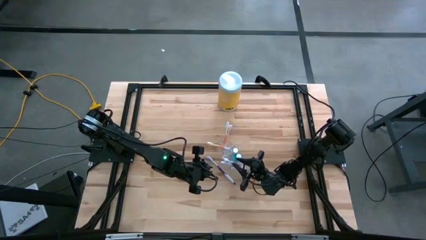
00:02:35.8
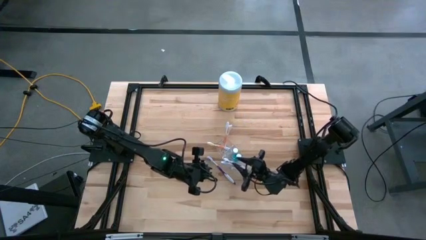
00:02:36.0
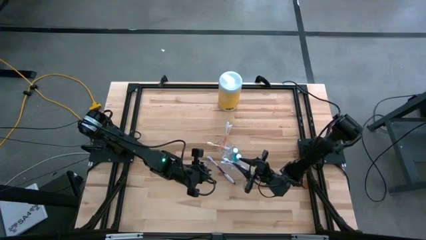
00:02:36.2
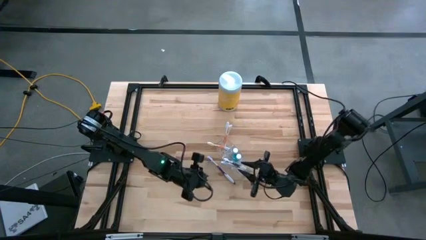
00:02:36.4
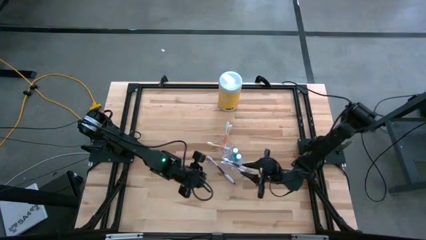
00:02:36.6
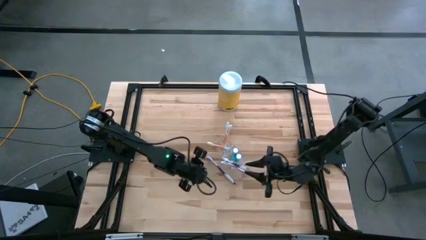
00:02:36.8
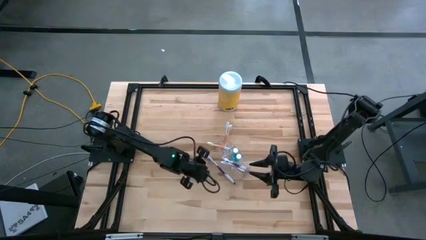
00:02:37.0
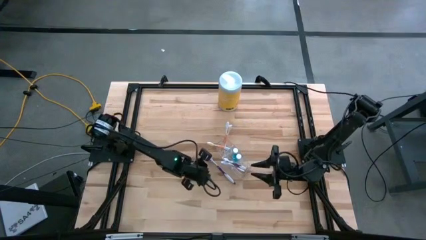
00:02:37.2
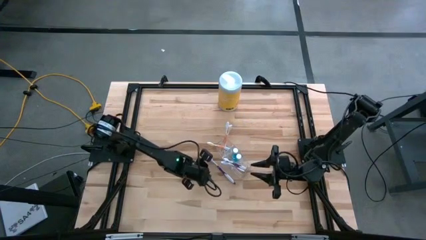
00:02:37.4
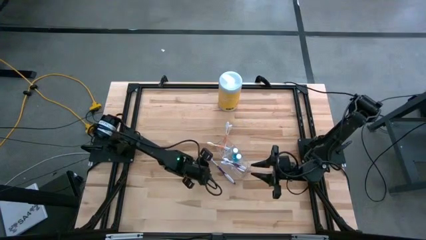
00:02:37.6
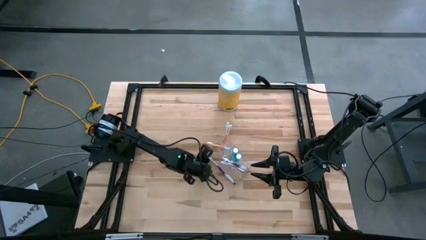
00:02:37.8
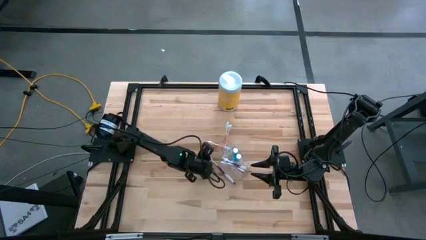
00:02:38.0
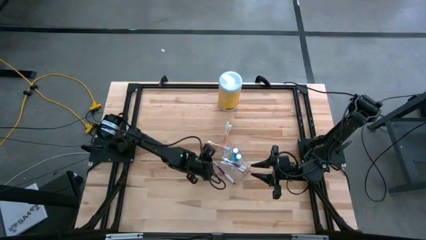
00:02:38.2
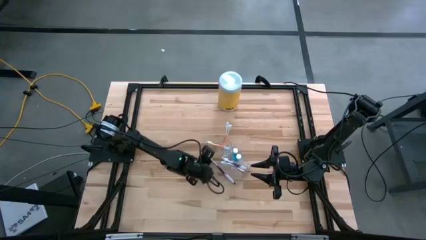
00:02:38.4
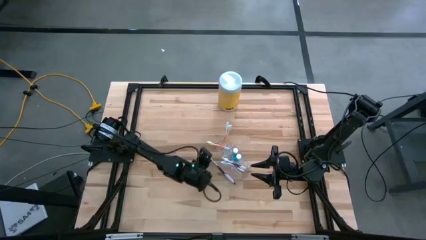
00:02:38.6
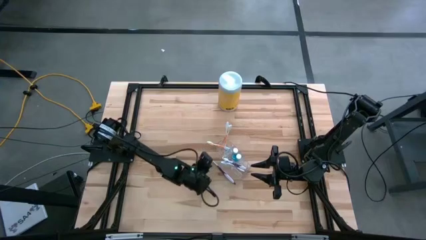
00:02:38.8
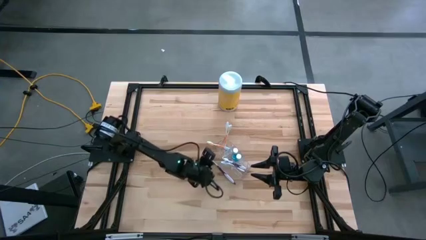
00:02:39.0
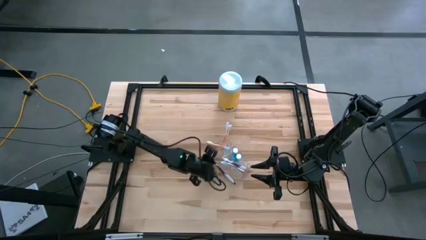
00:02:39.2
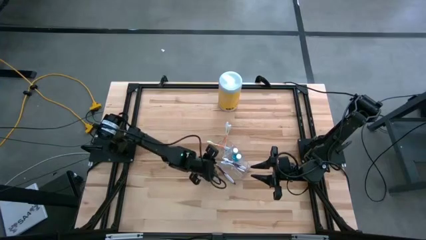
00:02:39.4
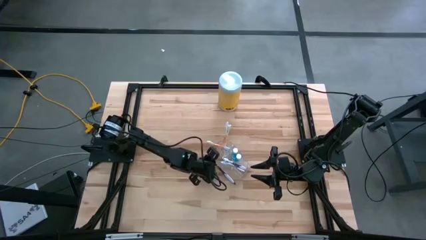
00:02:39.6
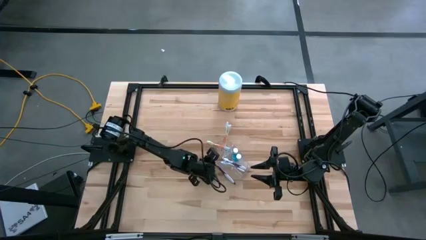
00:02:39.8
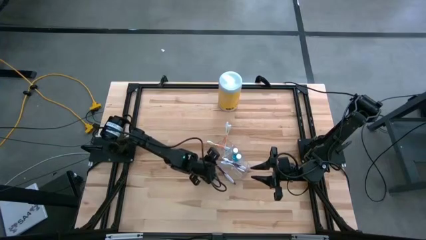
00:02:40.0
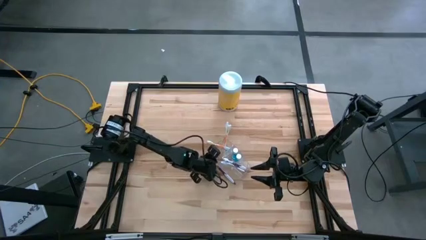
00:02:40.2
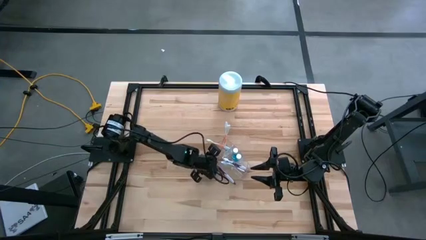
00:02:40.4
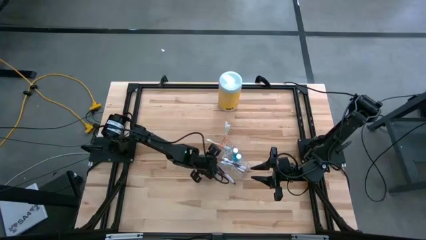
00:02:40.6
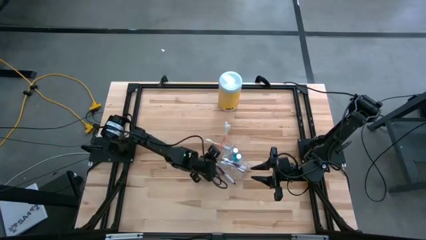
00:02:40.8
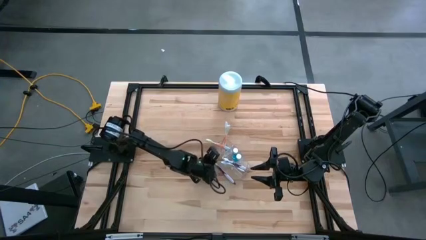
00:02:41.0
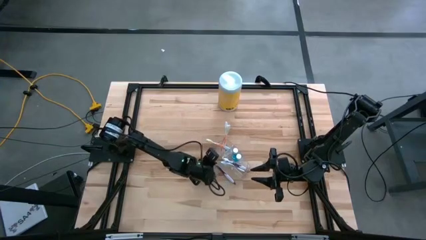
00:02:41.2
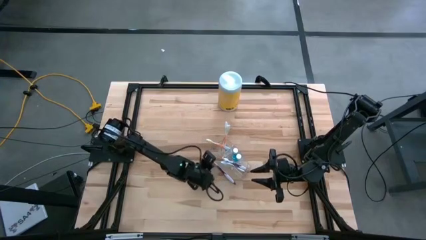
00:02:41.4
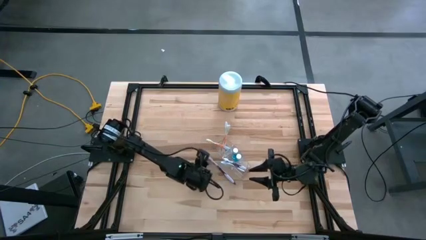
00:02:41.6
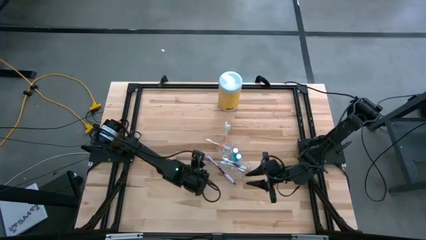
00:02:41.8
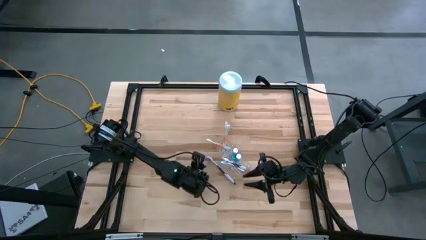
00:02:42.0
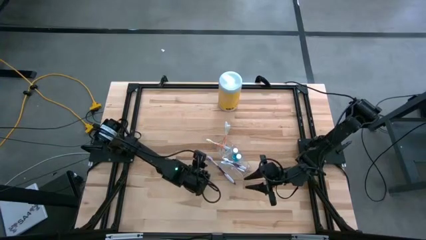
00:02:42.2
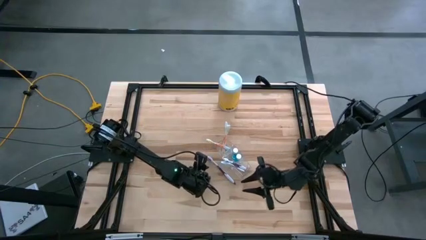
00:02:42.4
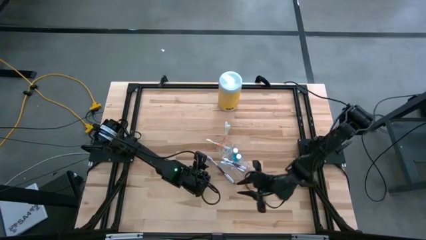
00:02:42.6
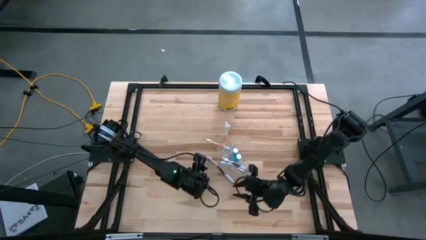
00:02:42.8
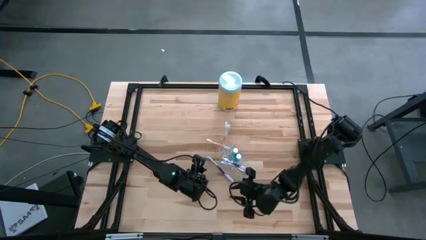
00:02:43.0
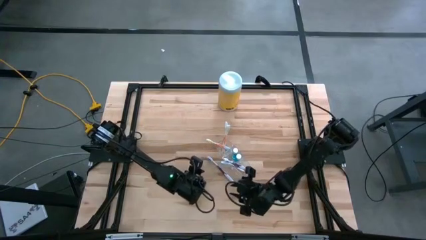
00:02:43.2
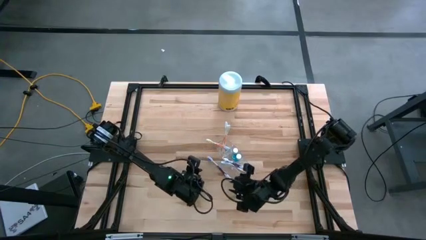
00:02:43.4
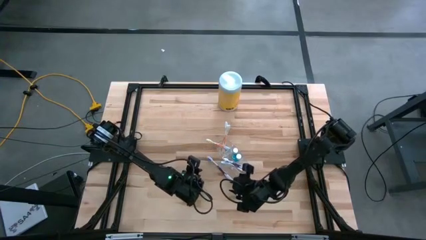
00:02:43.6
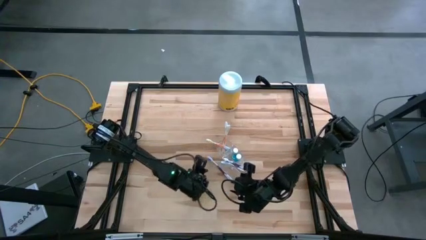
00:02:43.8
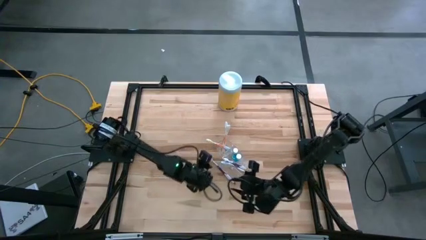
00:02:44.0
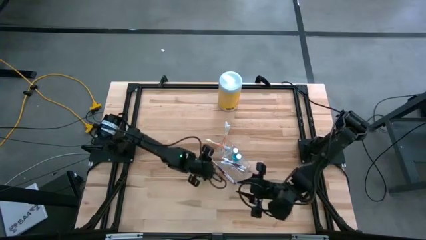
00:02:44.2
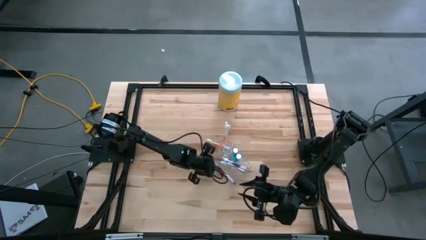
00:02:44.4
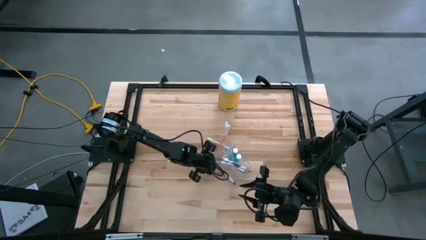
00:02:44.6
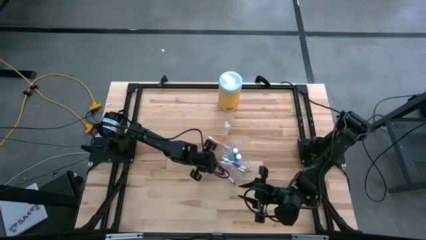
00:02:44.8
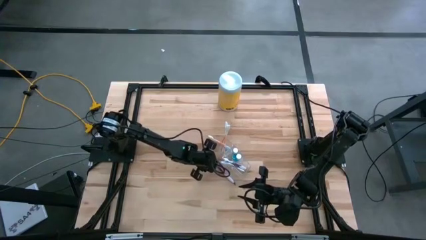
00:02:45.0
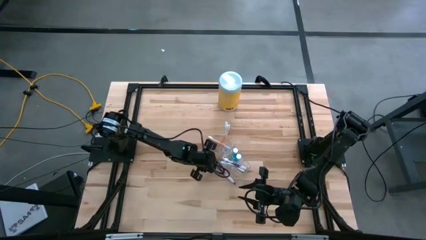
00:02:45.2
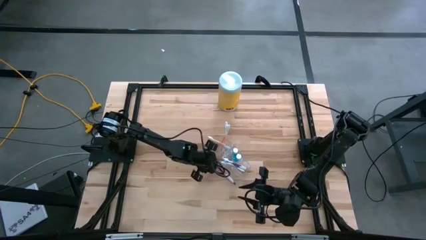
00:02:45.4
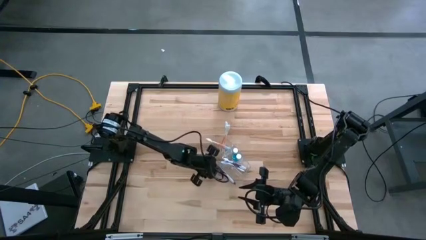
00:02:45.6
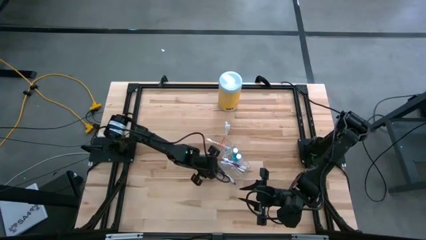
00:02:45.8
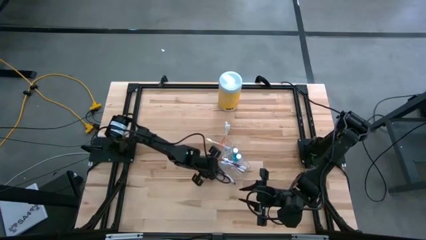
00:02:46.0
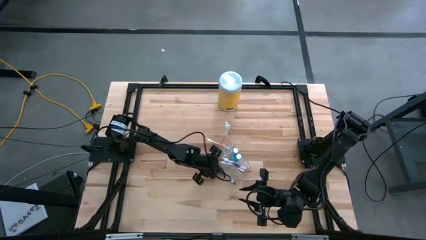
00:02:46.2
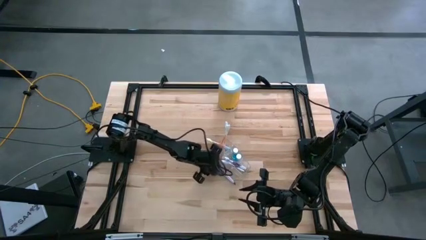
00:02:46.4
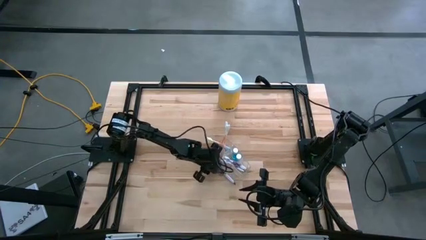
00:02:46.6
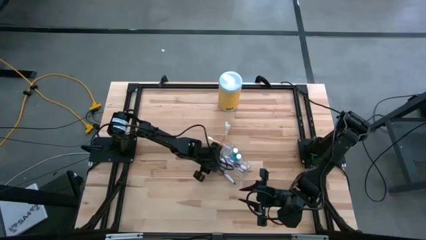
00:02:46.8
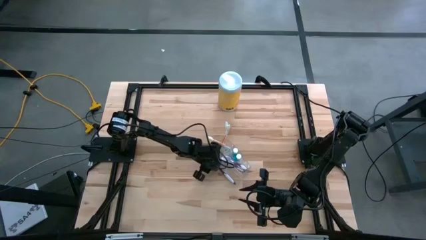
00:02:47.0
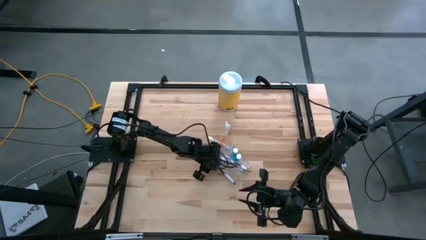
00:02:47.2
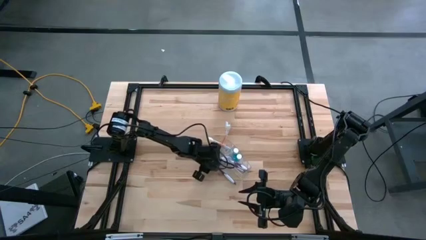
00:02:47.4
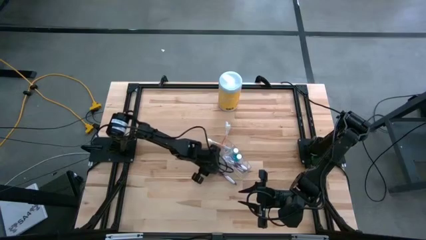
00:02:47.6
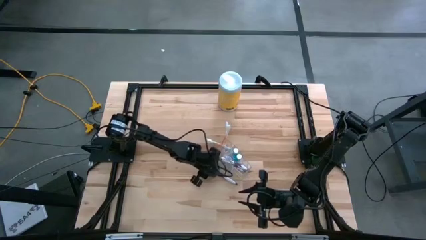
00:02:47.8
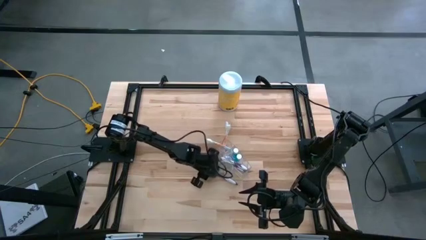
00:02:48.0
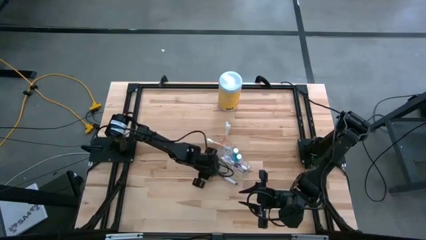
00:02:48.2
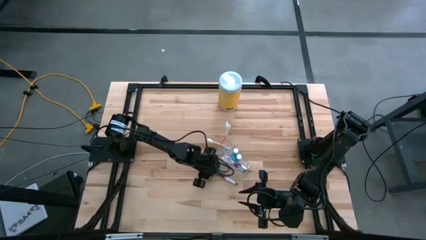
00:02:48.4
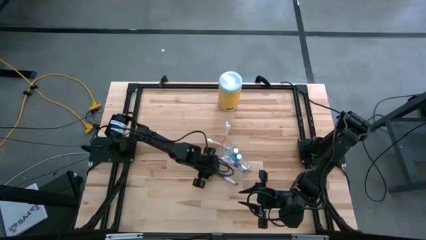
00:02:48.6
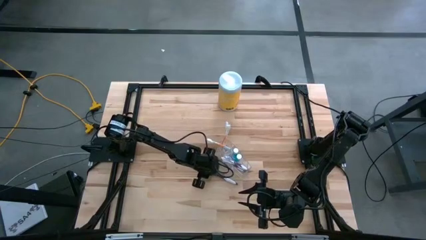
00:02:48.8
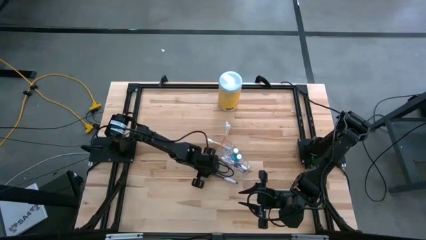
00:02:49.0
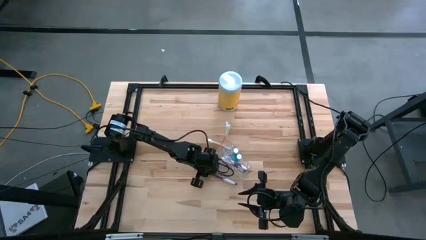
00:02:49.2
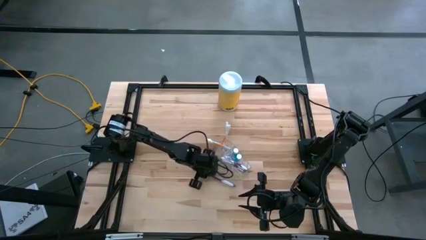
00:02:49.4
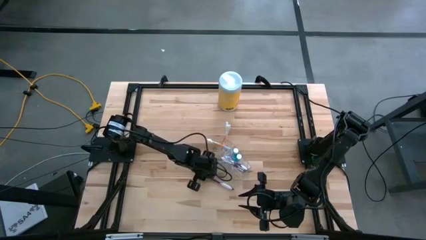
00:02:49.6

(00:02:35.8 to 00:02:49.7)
Task: Pick & Place toothbrushing station
Put the purple toothbrush into the bottom compartment of the transparent organizer
